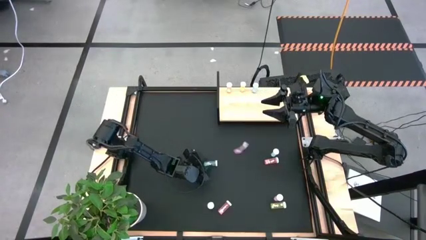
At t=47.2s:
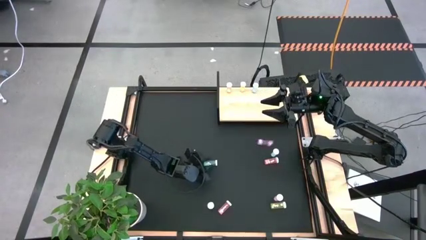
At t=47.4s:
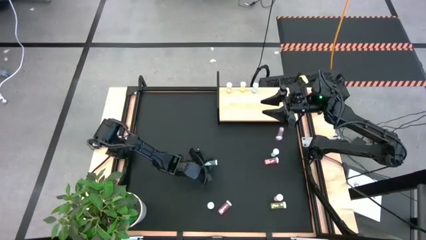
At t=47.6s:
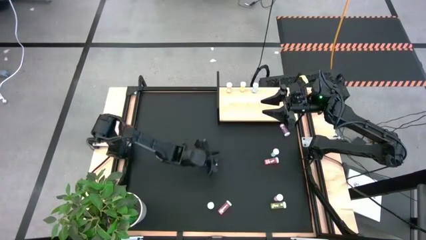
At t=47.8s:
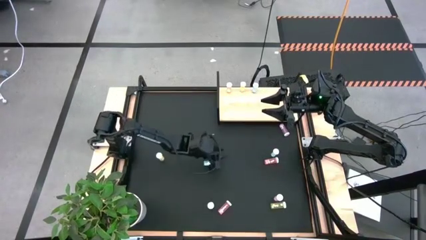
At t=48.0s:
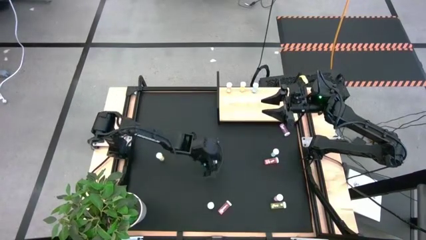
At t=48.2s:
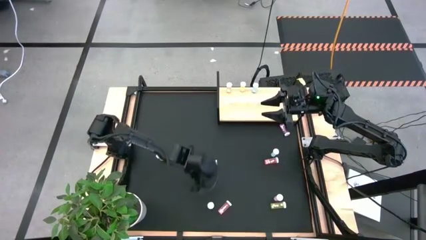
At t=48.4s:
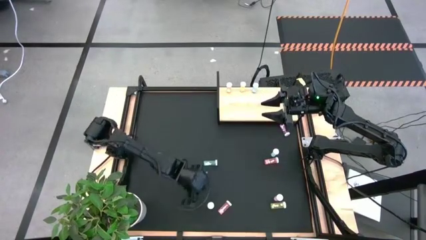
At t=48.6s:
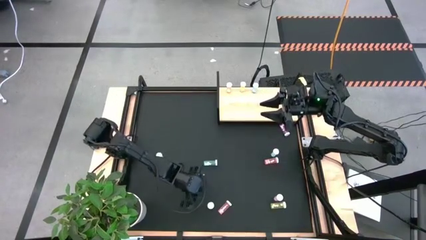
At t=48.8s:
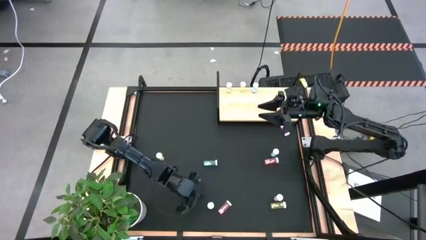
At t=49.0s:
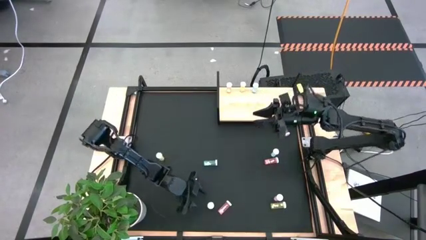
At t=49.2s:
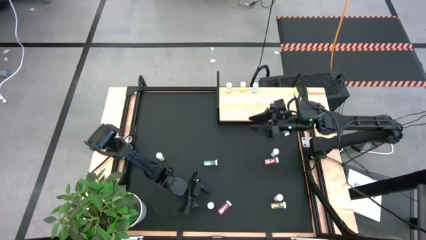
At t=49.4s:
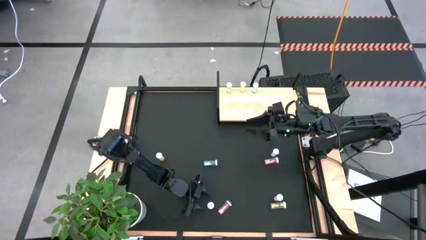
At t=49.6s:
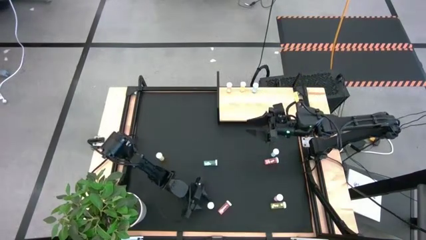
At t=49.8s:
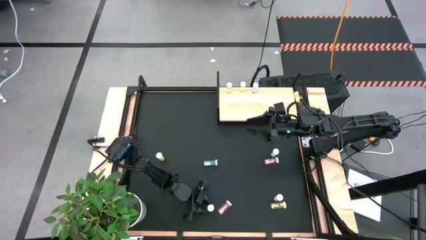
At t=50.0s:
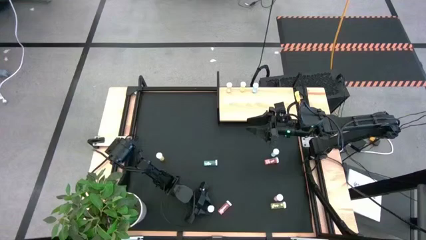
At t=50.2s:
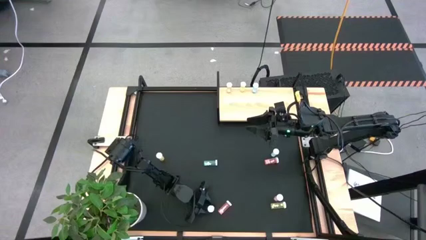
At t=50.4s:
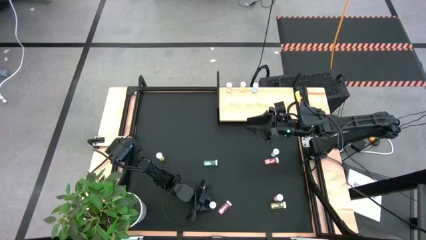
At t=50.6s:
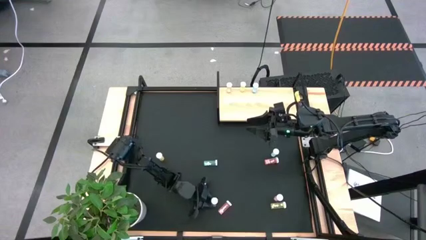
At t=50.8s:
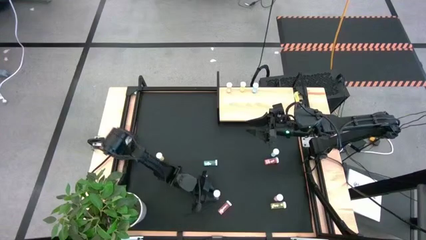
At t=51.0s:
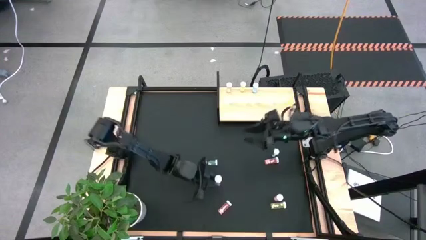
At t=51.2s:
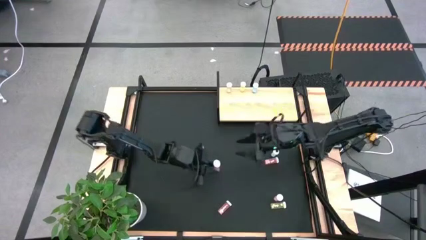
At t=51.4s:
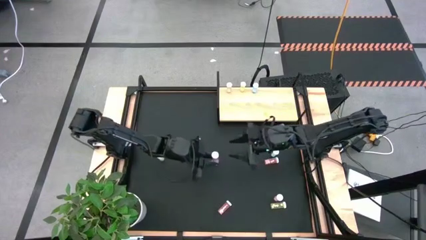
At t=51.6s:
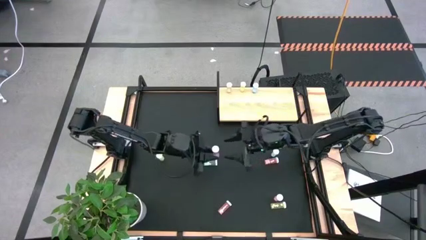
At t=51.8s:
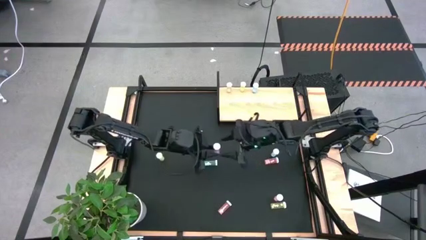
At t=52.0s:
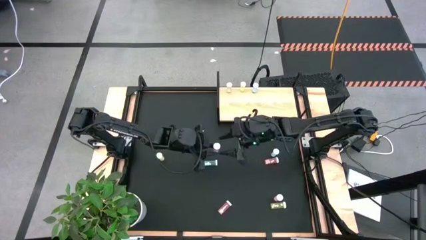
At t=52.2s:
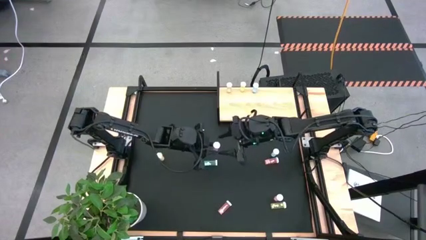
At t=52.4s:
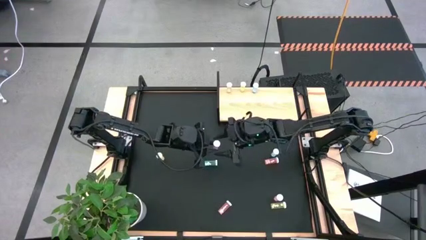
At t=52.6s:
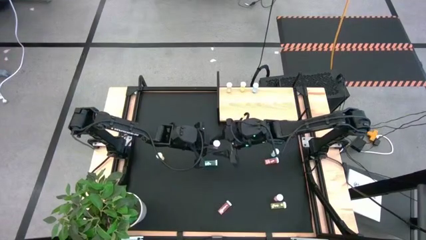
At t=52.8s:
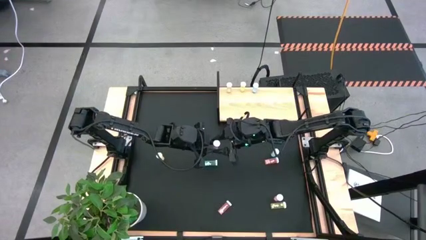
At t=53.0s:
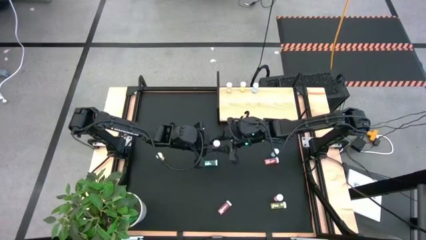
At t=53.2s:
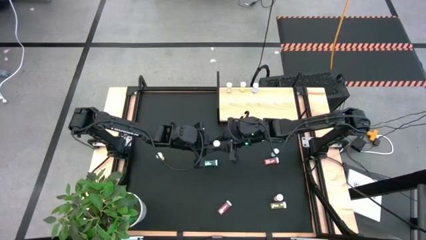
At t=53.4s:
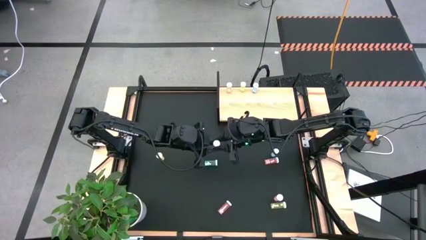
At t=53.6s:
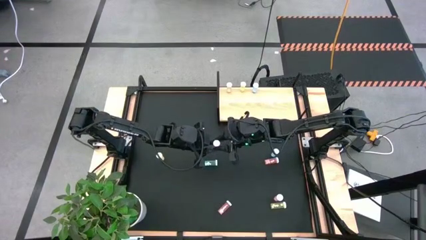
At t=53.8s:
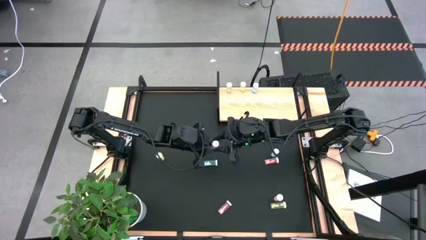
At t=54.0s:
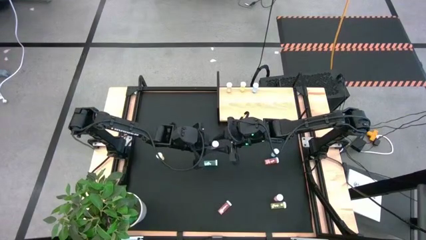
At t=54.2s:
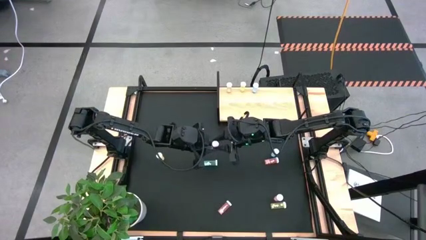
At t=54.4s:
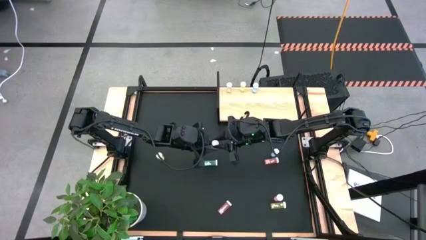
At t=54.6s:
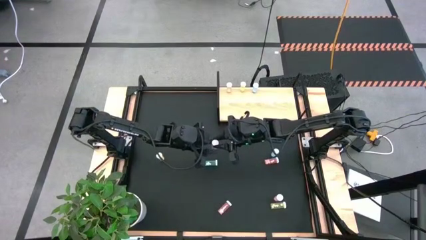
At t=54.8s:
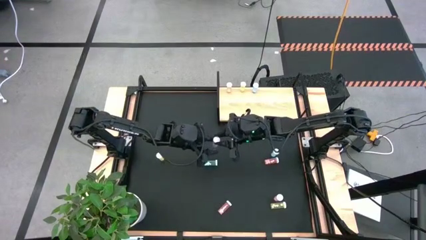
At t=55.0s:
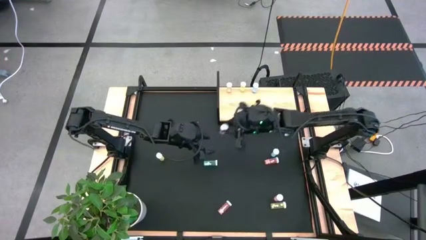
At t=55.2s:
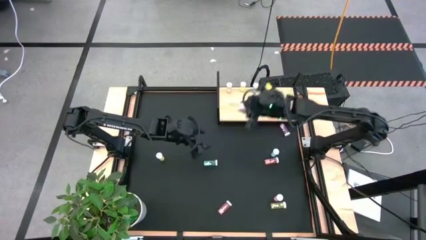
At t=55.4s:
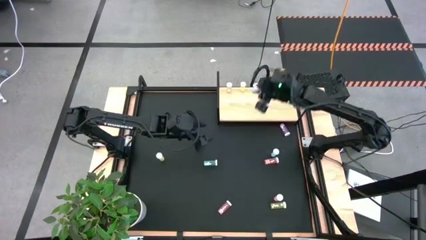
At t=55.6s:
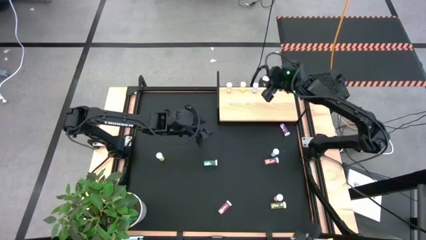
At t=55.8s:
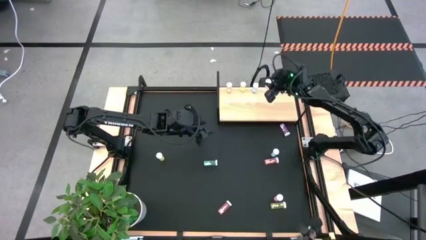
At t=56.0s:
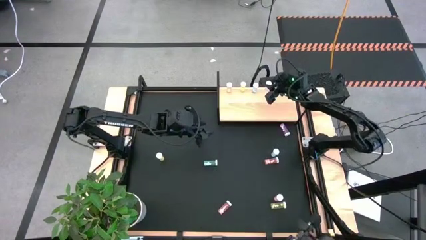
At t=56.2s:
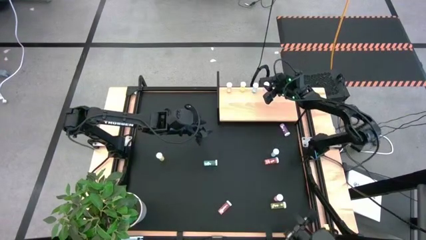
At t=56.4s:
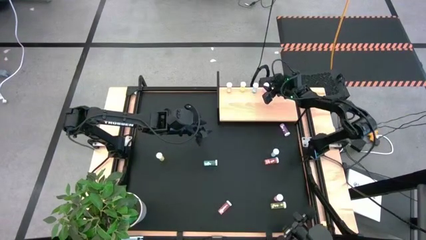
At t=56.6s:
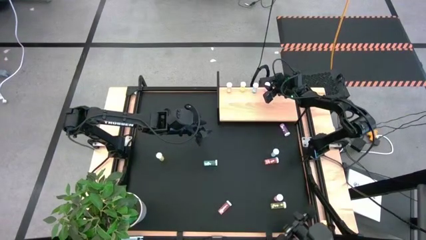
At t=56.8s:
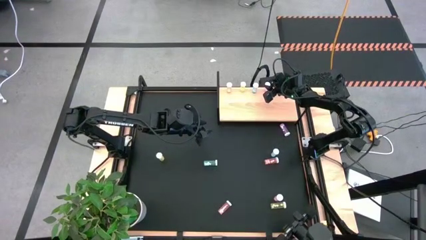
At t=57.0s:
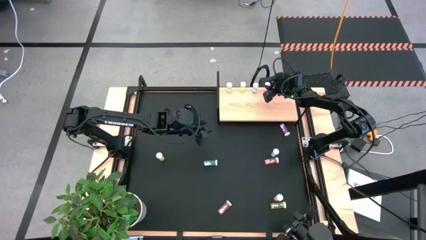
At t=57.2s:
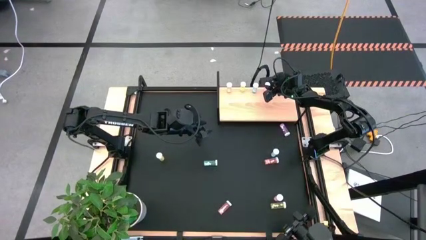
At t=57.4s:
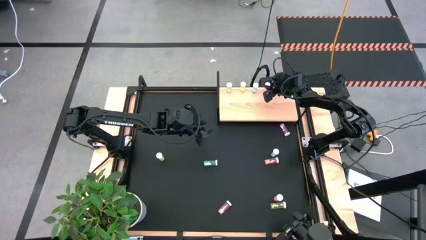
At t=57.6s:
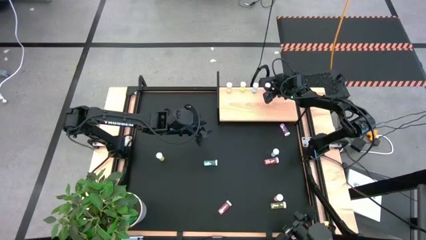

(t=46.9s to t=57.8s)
Task: Pick and place medicine bottles onto shelf by color
Put the bottom left purple pill bottle on the shelf
